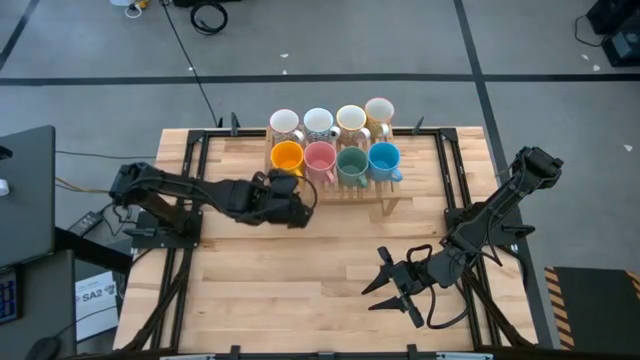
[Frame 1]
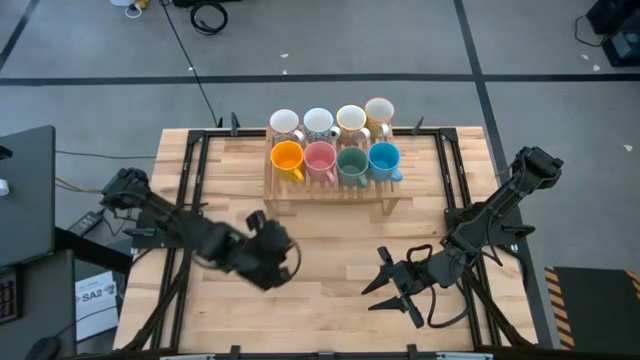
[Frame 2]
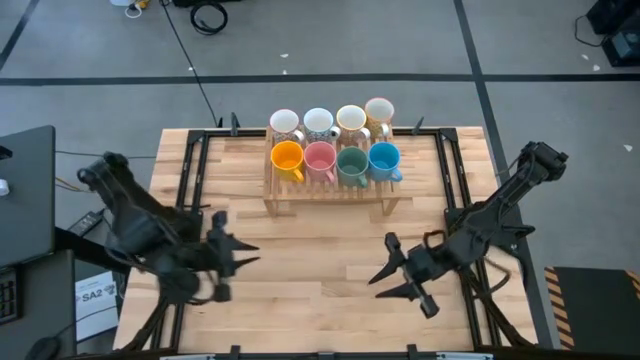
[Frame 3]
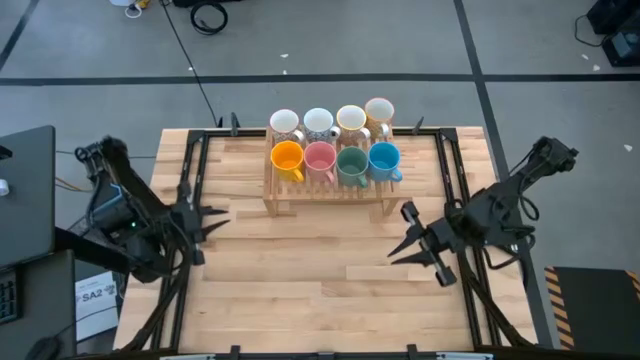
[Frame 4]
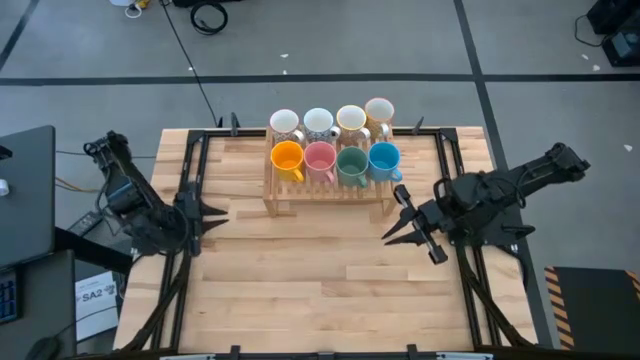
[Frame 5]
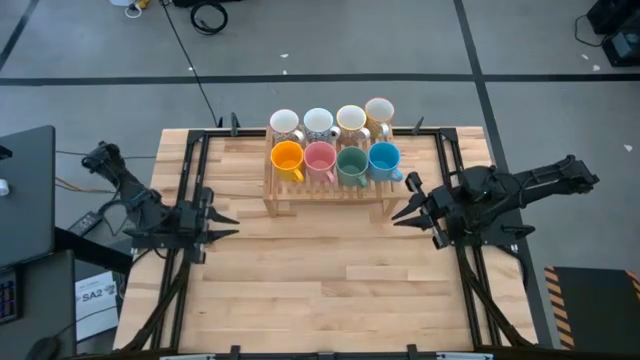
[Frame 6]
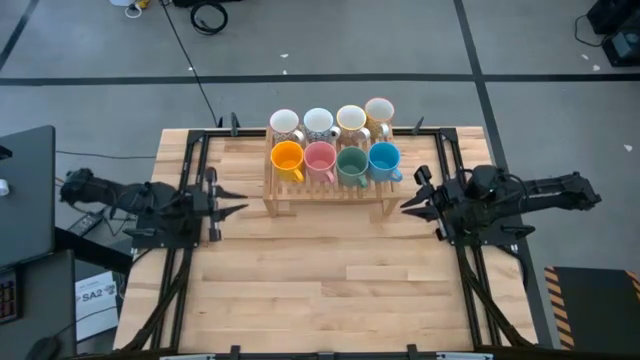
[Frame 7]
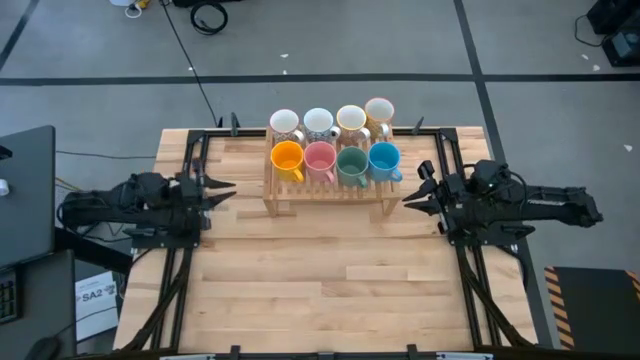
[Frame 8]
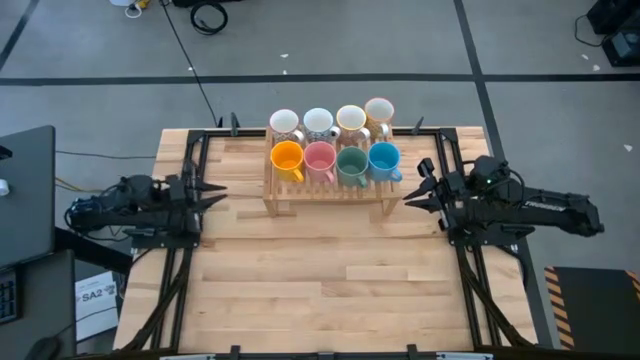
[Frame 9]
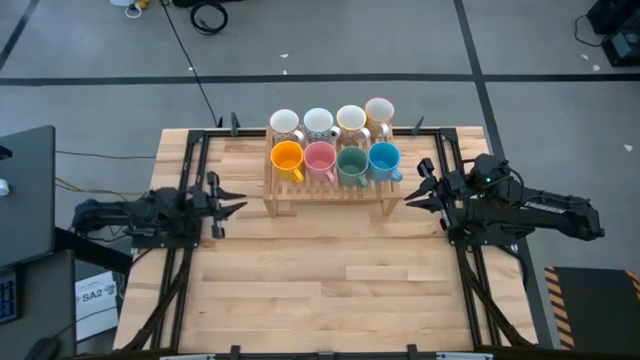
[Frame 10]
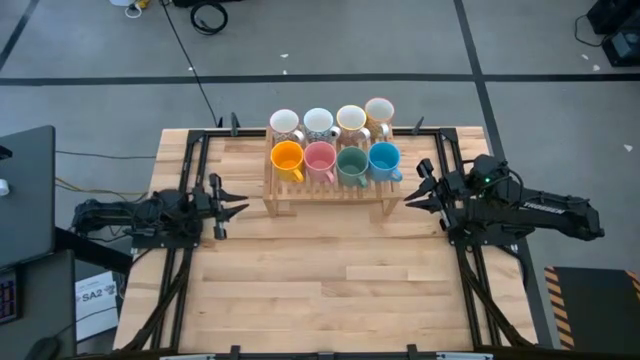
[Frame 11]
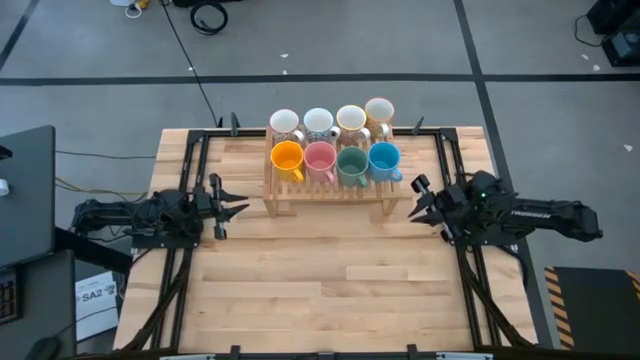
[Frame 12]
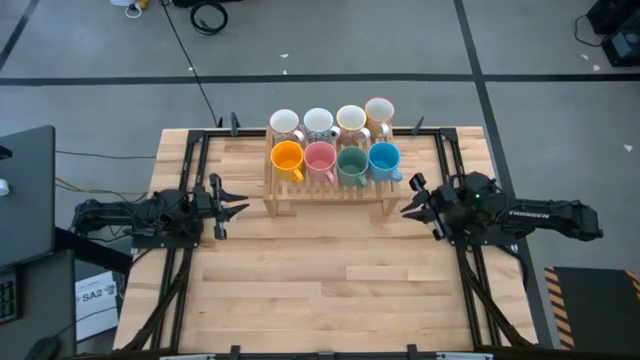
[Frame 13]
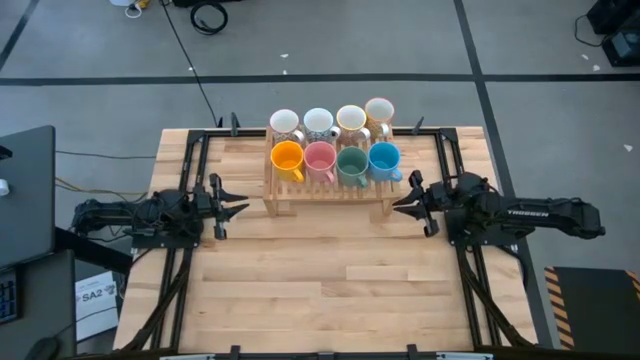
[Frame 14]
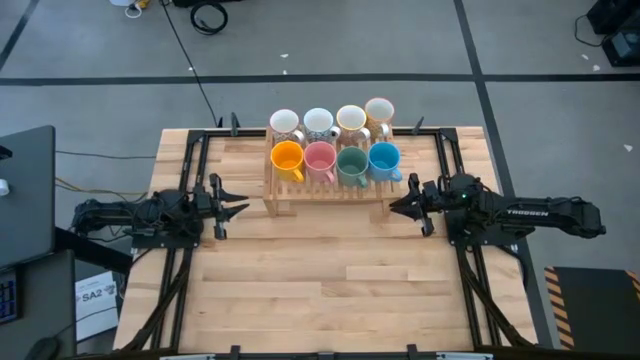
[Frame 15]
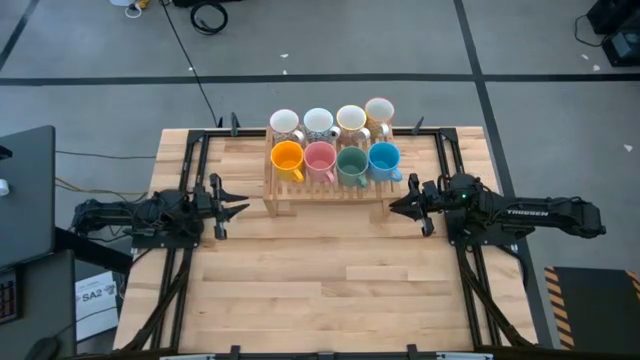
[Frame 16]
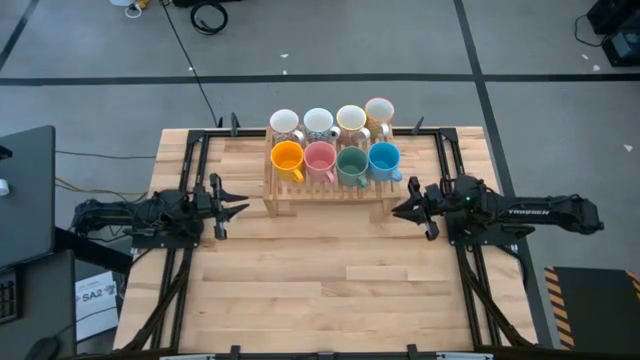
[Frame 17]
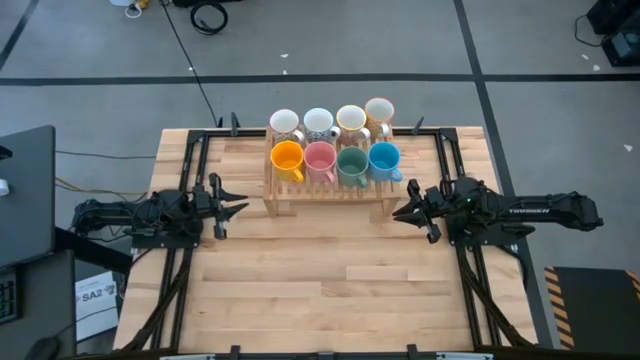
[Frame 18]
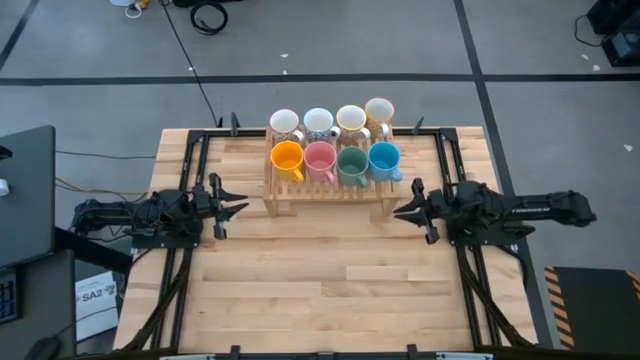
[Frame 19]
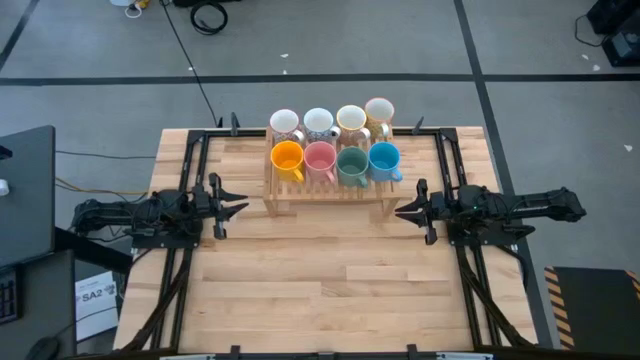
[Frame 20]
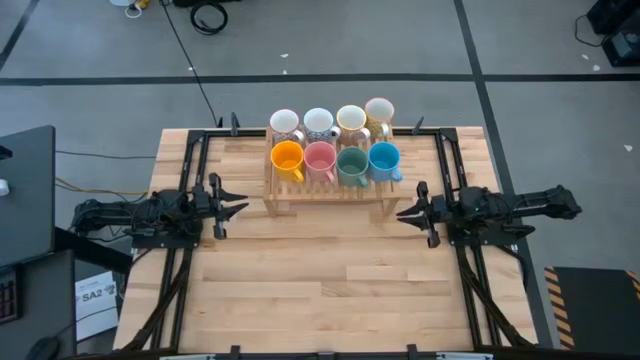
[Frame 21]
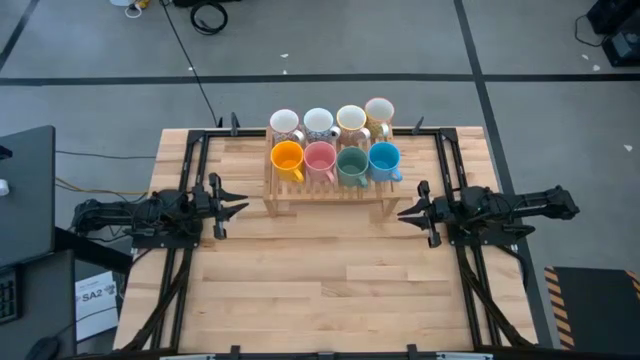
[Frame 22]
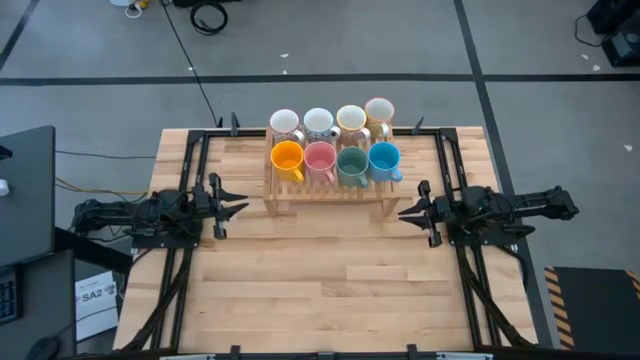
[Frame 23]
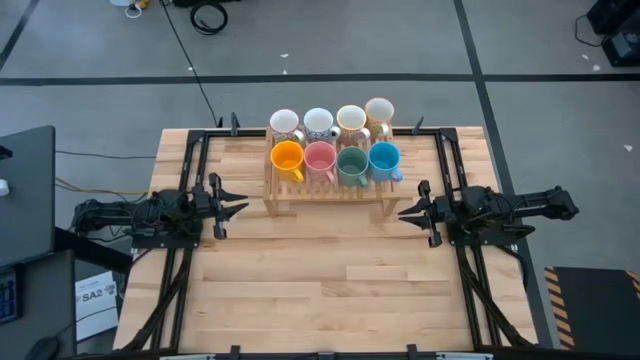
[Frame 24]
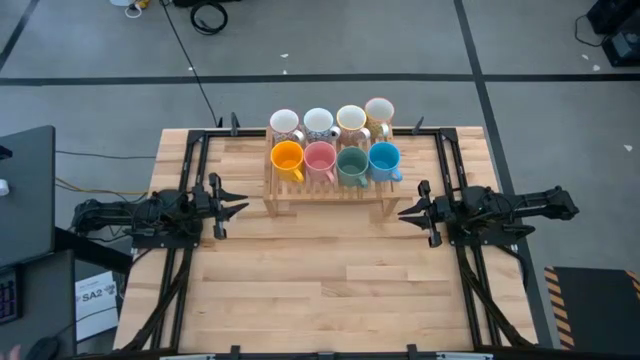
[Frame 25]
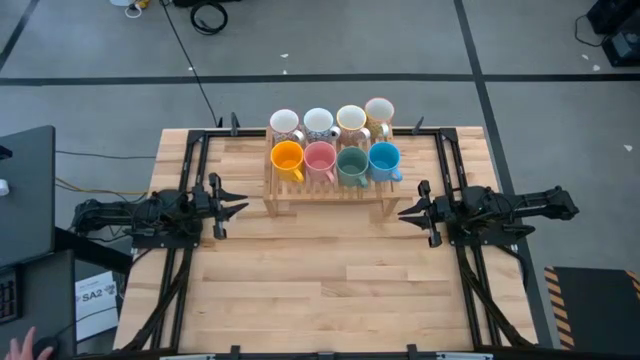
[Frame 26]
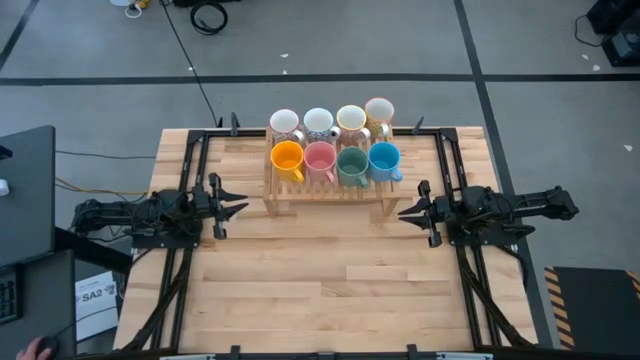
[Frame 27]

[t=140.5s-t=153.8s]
Task: Place coffee mugs
Return to Home Position

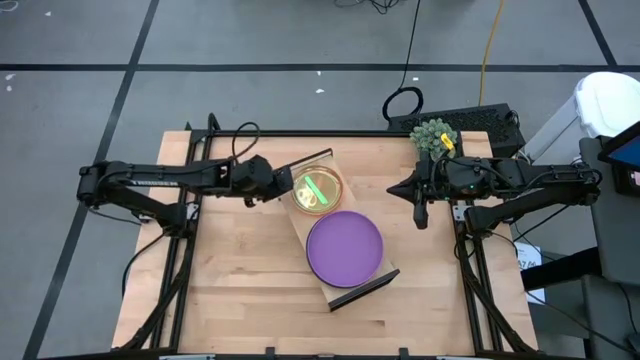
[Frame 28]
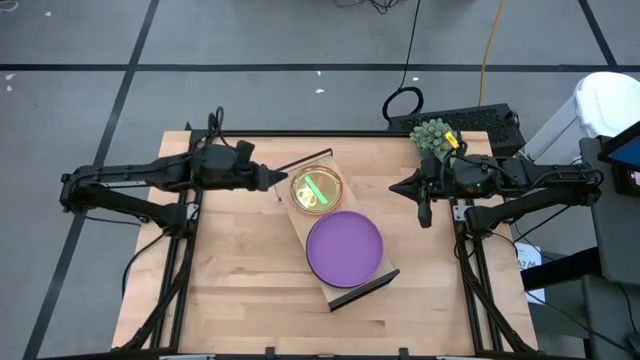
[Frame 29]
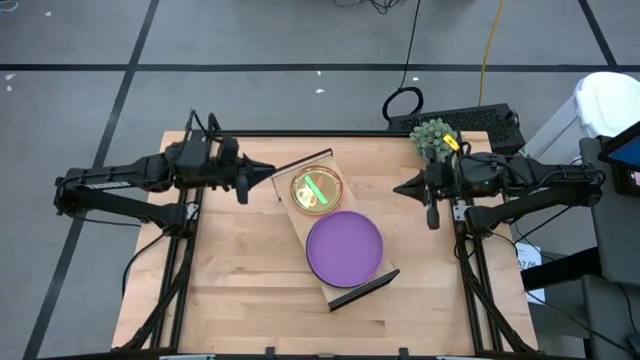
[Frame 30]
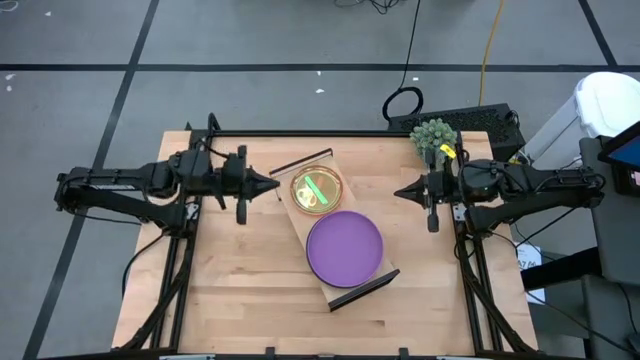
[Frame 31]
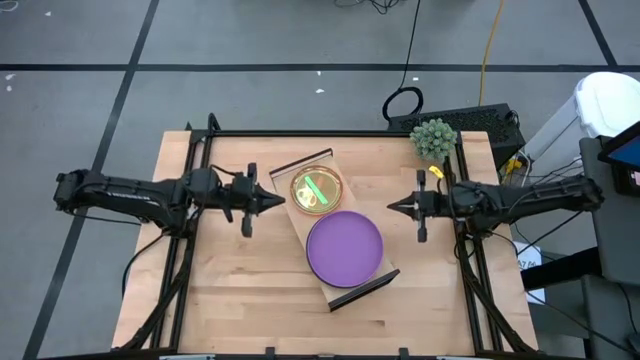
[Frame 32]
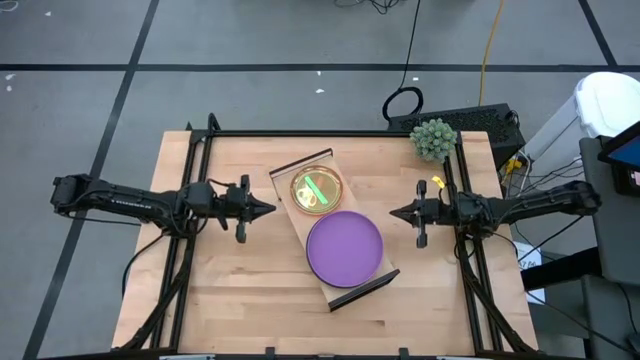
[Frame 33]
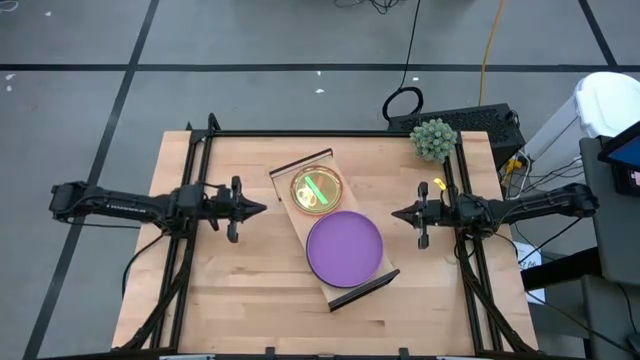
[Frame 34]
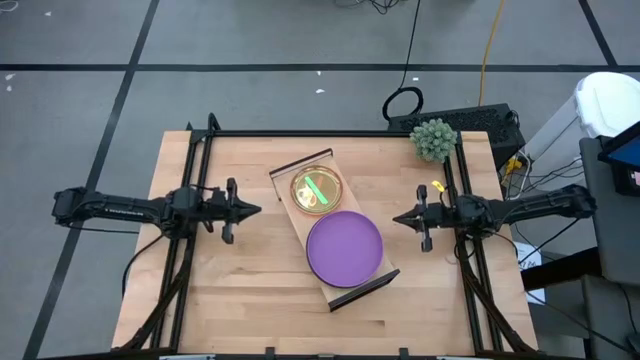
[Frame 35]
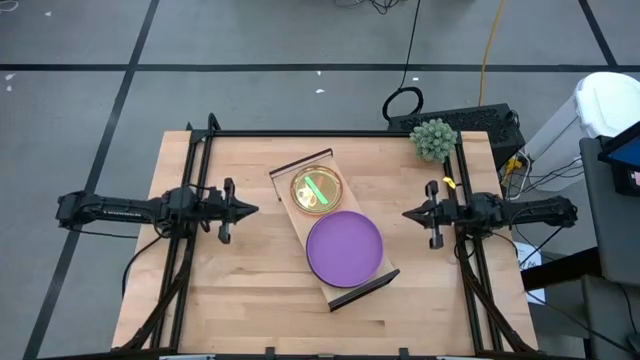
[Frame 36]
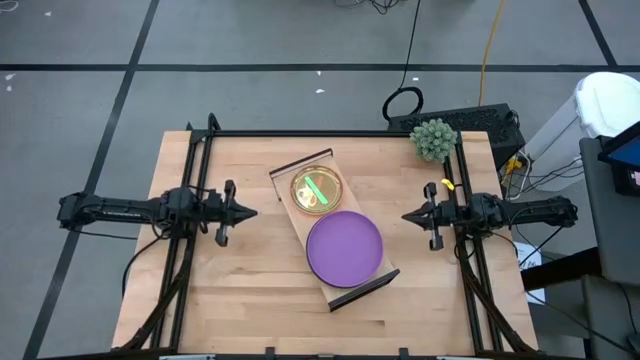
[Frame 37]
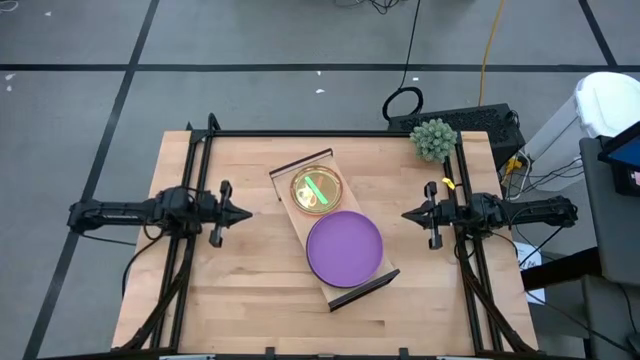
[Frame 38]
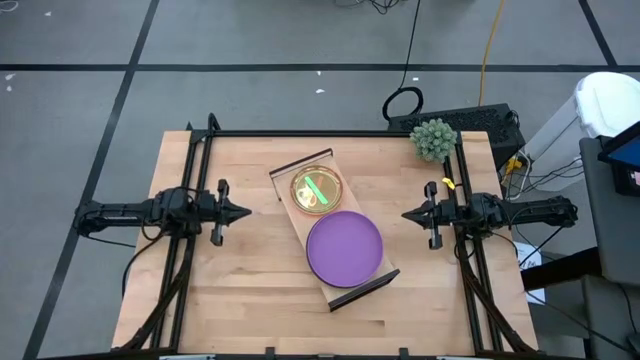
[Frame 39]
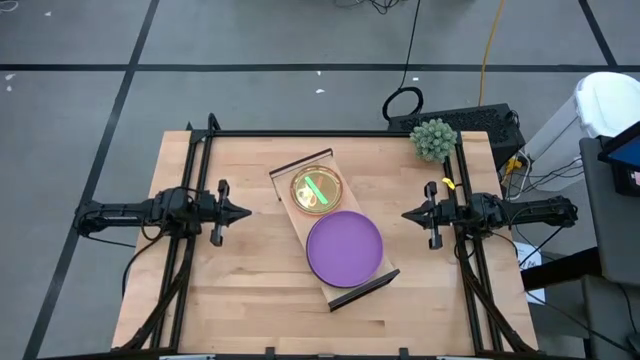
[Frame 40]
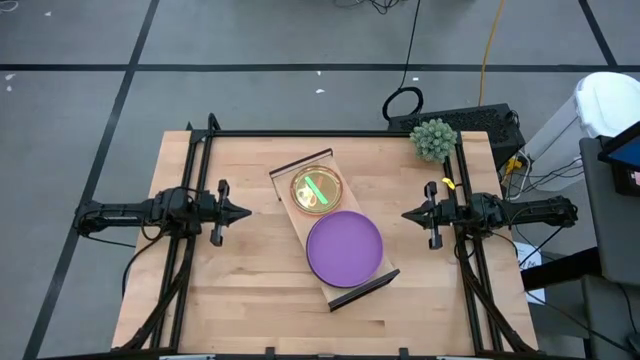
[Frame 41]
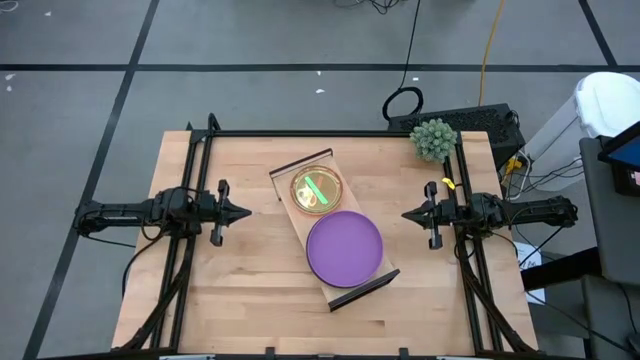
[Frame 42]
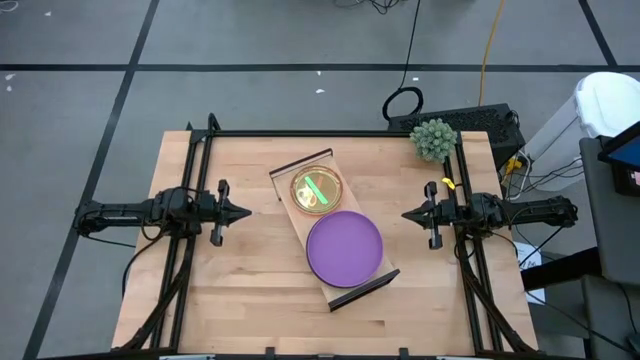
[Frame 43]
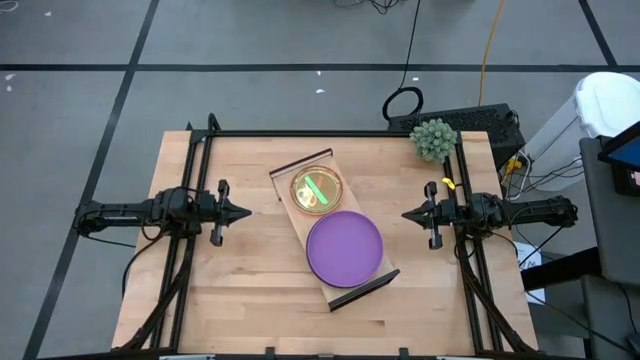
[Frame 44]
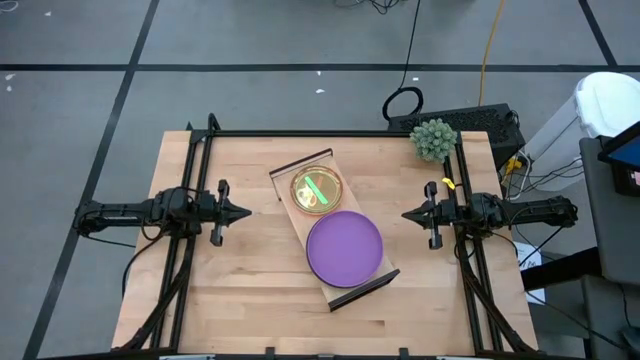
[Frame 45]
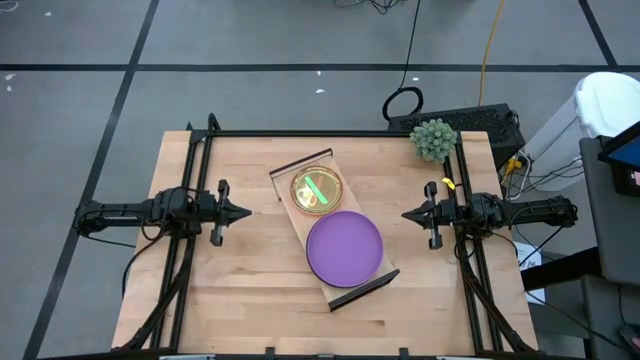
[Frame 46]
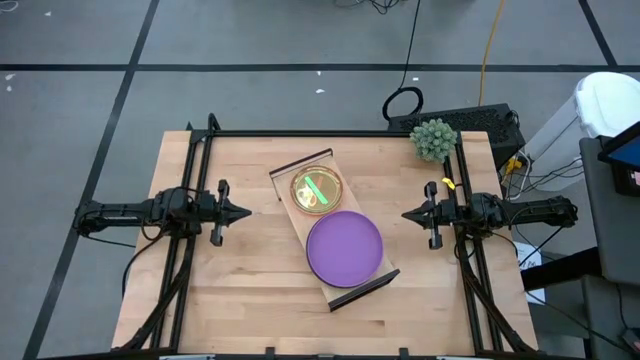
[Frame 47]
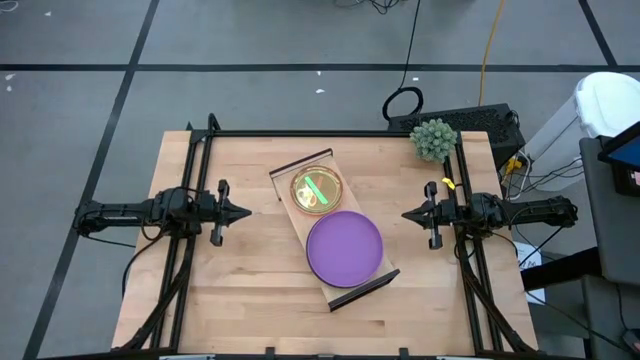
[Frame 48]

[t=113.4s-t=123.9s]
Task: Place and stack plates onto a shelf
Return to Home Position
